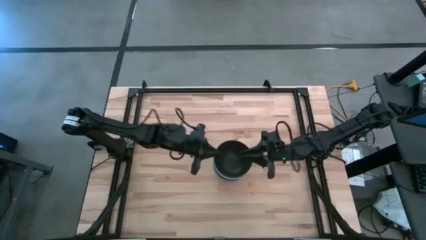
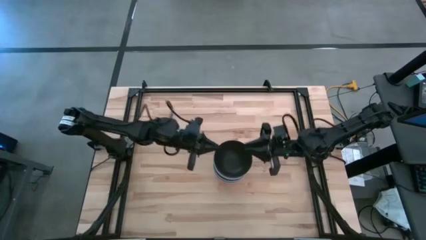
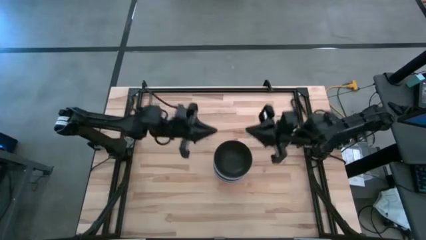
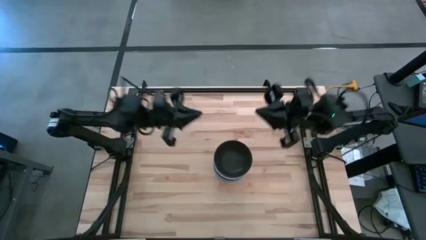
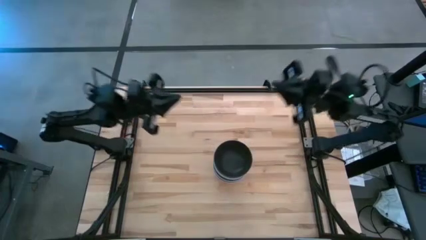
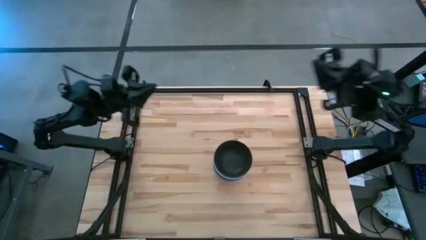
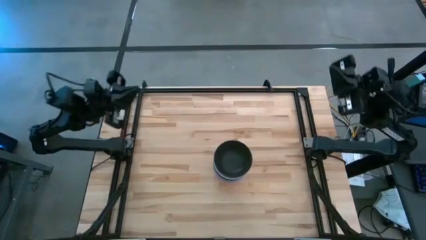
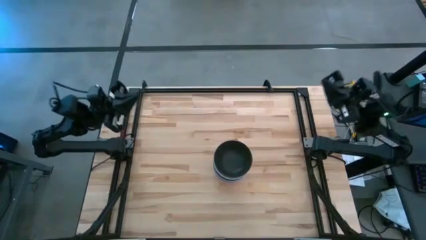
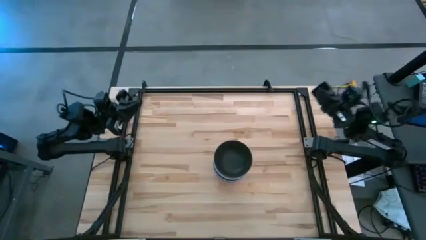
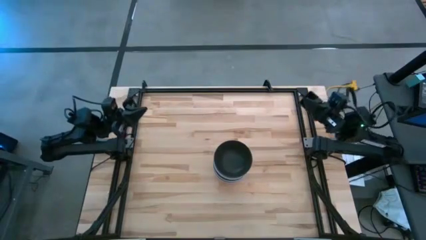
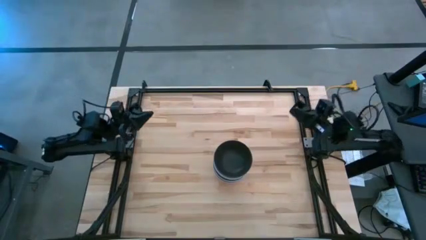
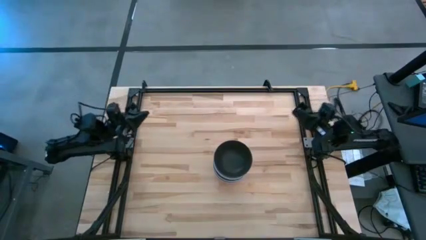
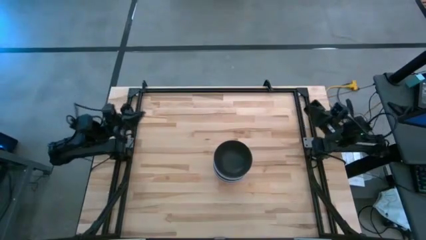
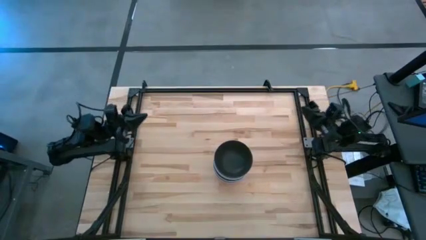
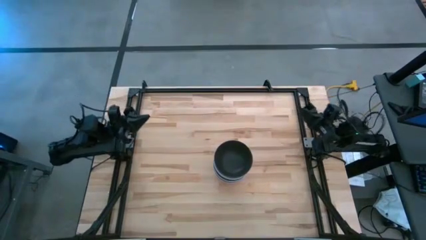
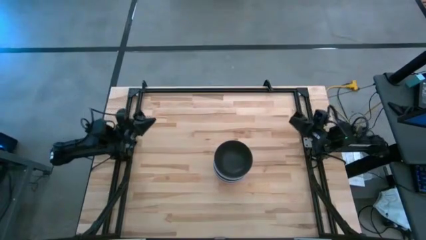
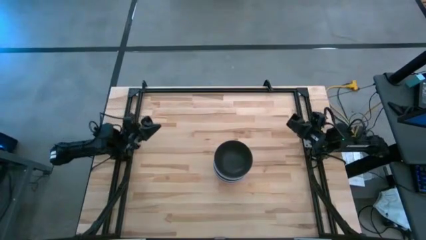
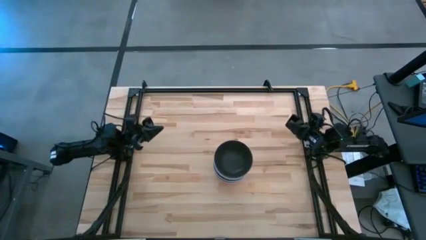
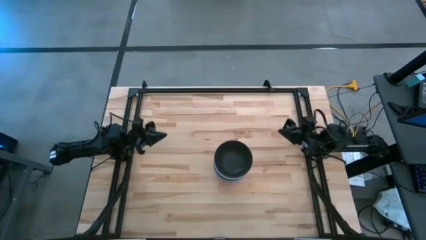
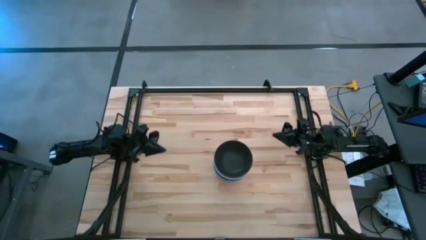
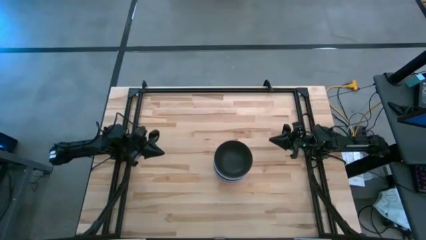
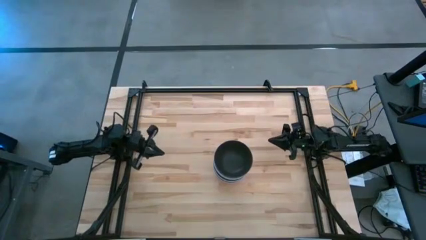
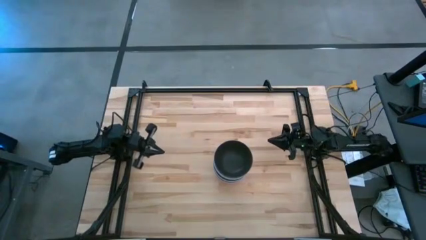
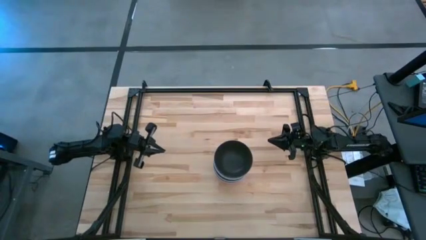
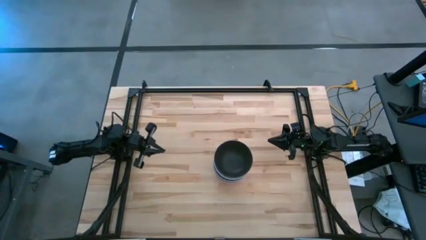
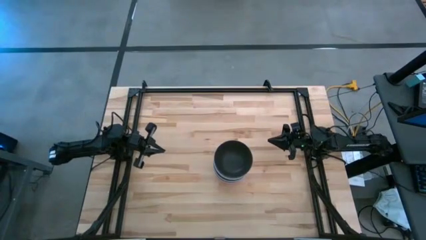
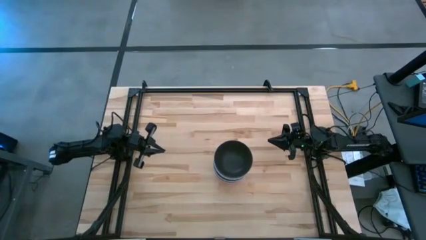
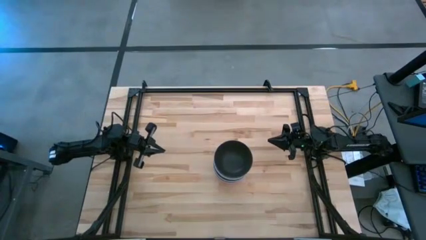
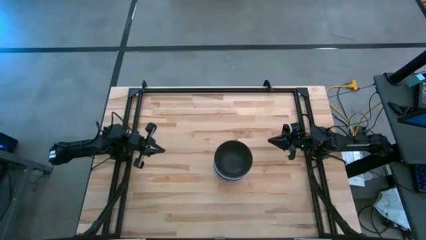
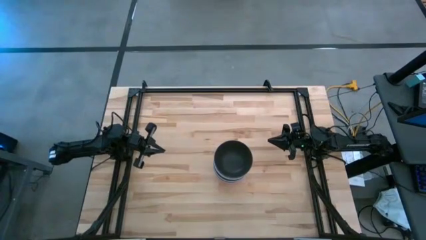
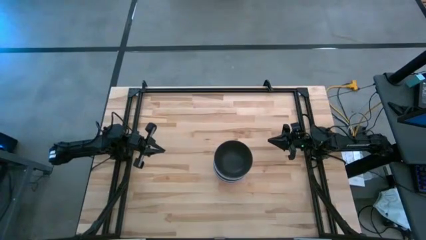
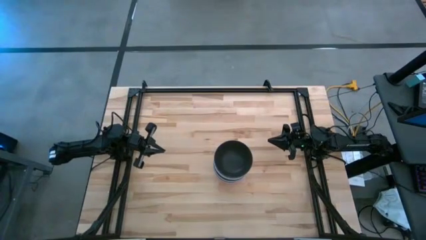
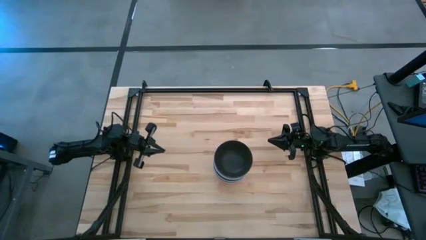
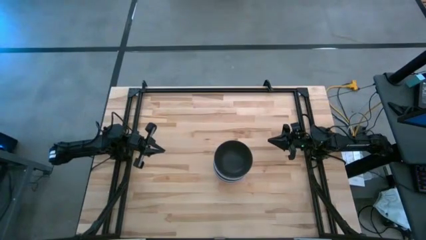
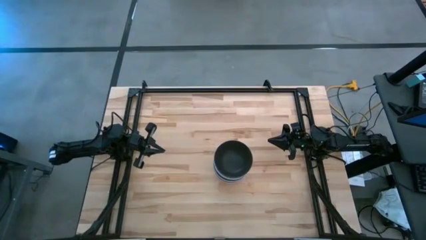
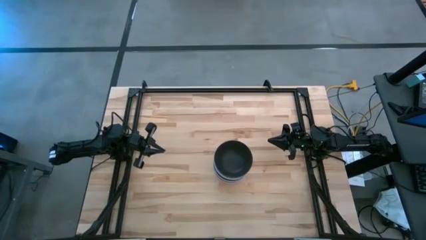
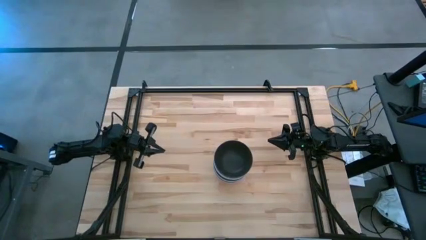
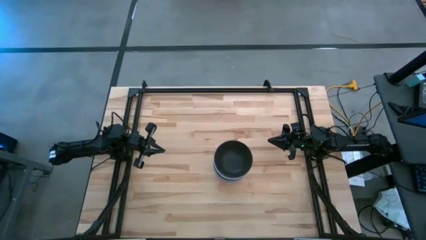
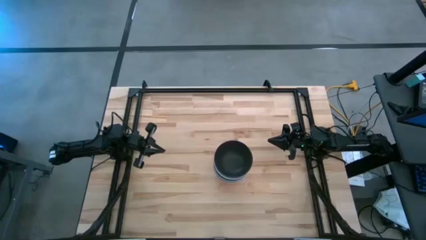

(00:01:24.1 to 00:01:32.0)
Task: Nest bowls inside each other
Return to Home Position

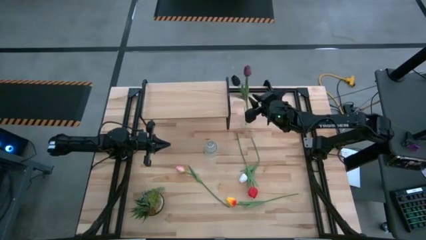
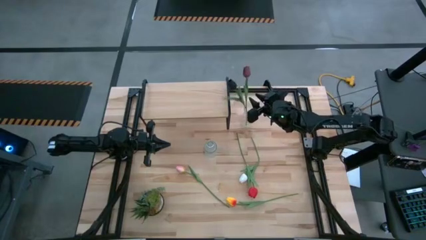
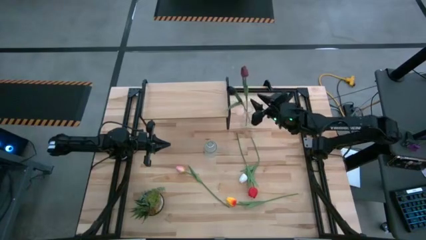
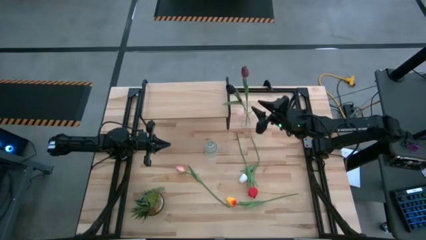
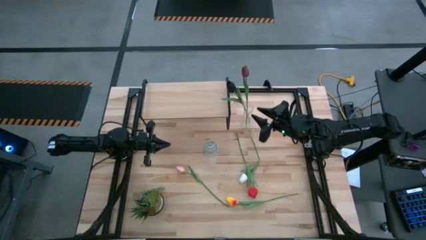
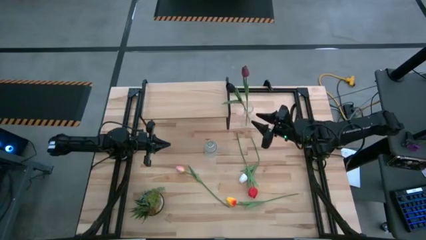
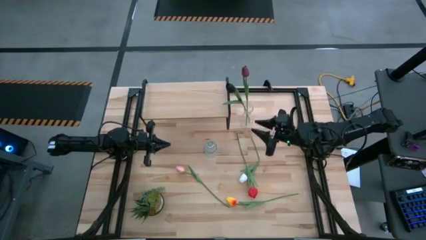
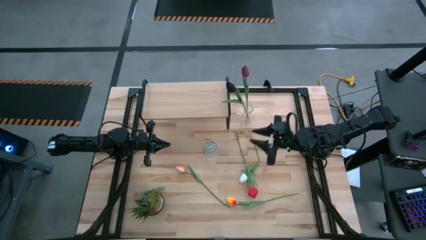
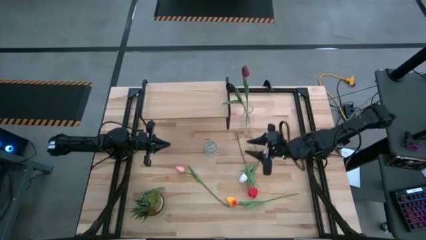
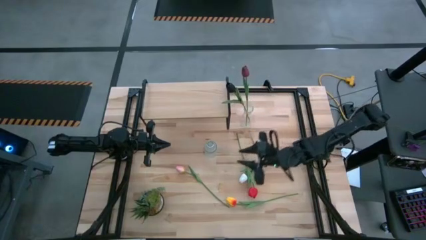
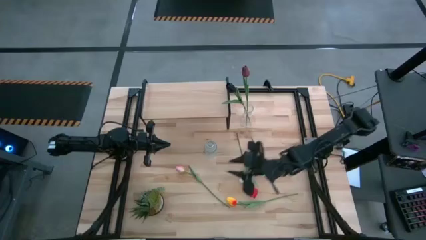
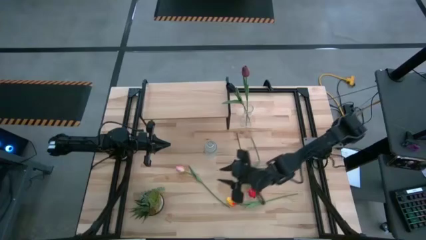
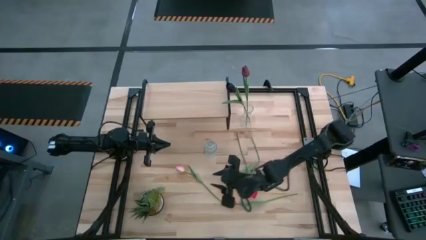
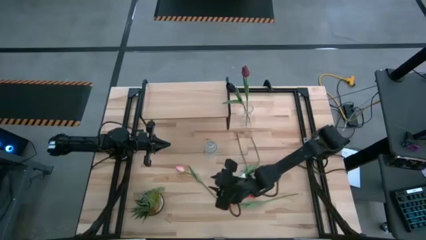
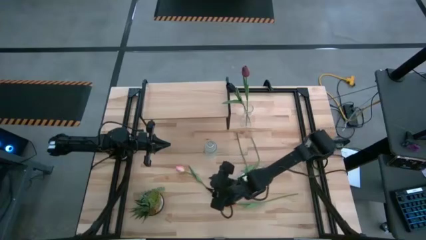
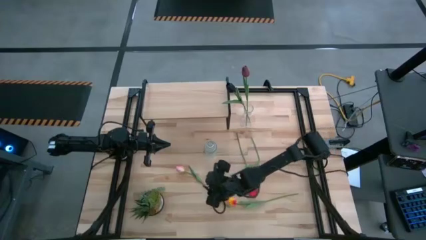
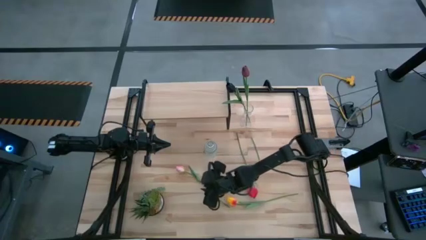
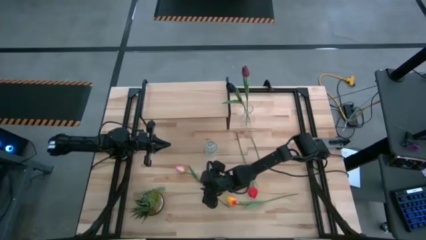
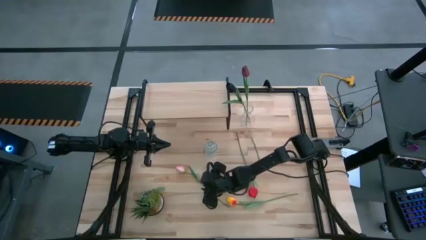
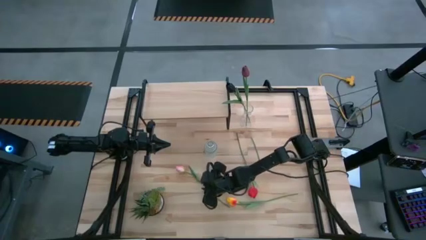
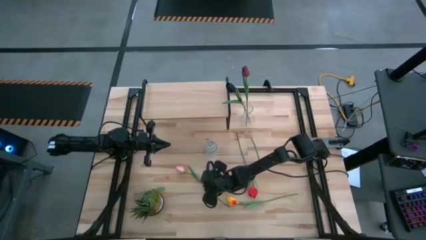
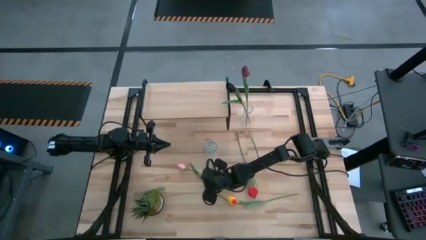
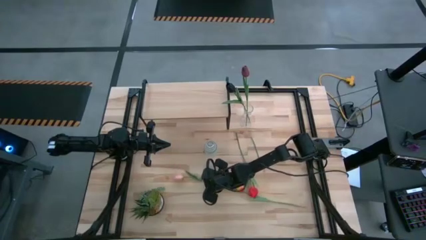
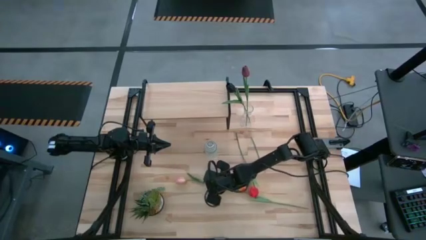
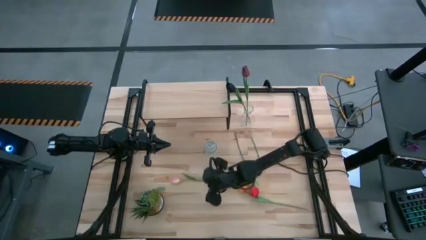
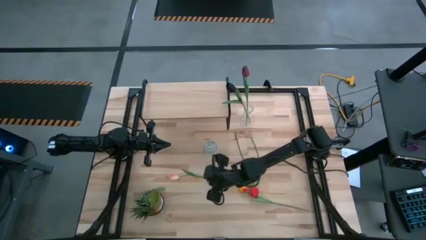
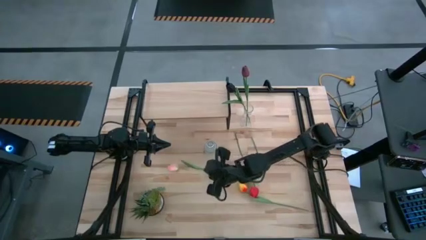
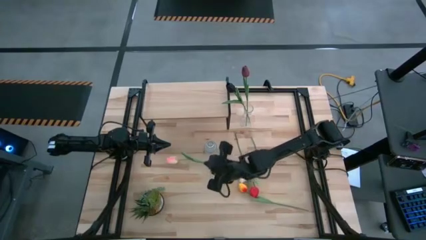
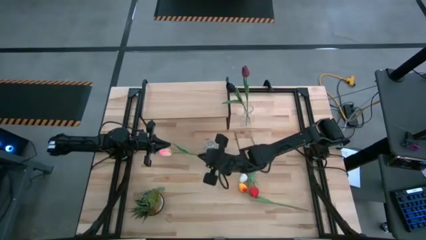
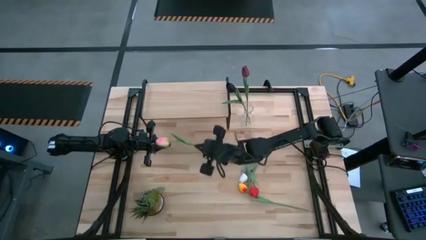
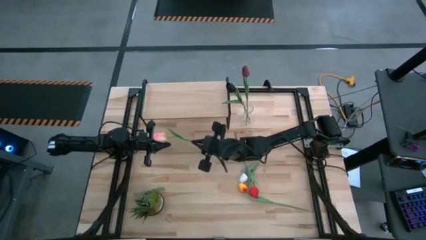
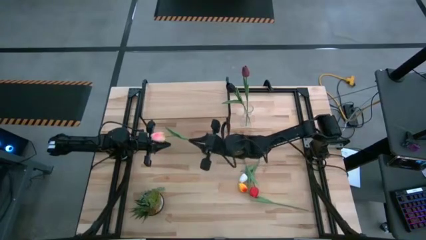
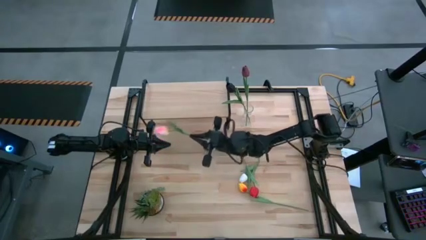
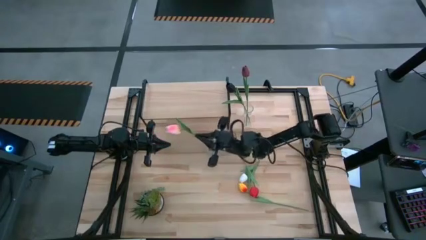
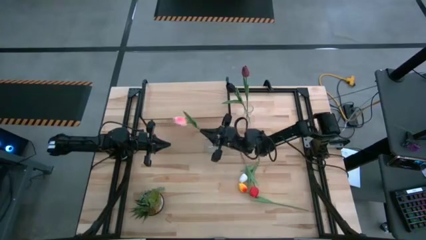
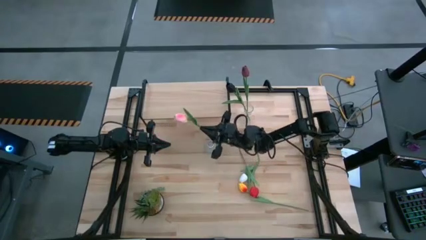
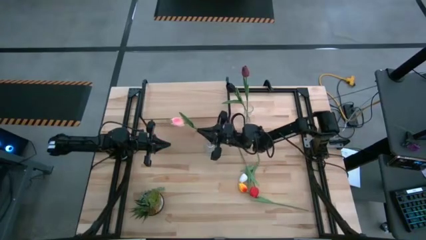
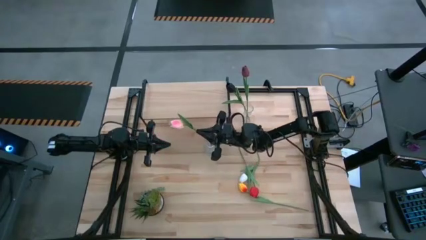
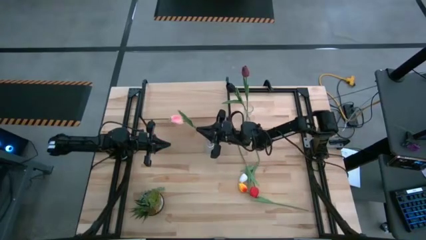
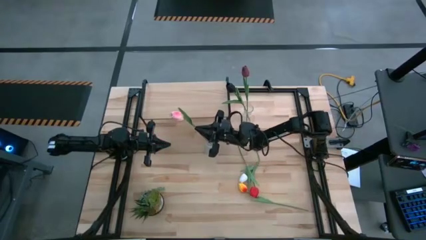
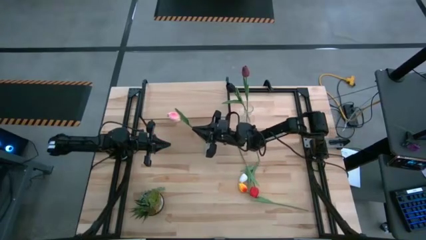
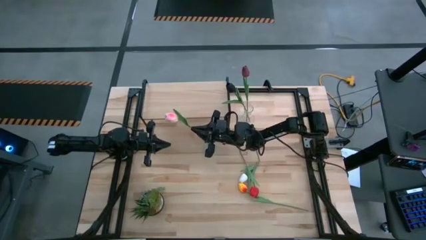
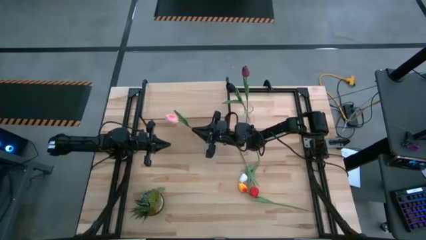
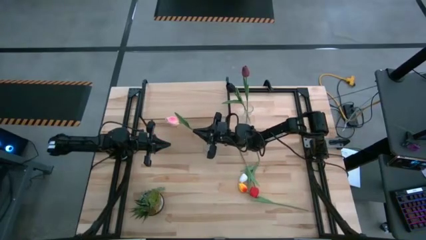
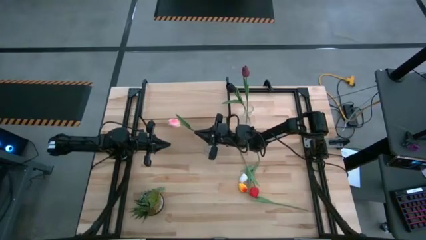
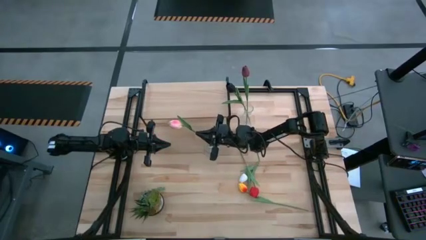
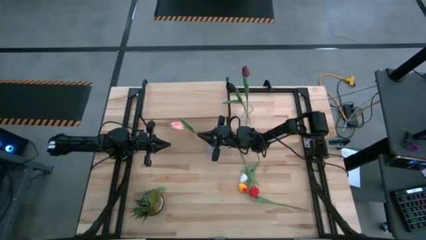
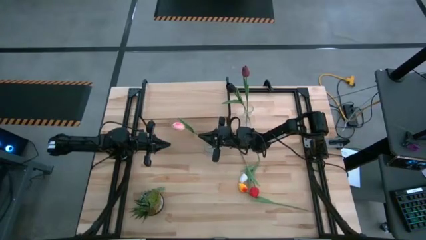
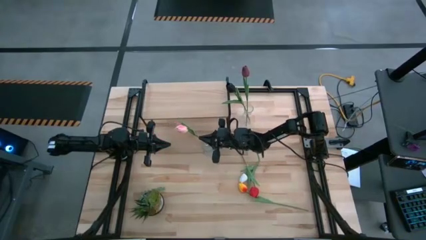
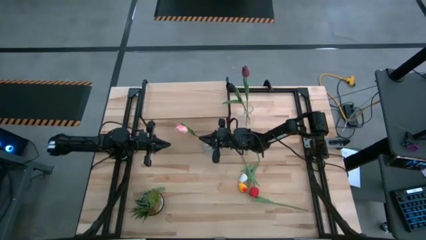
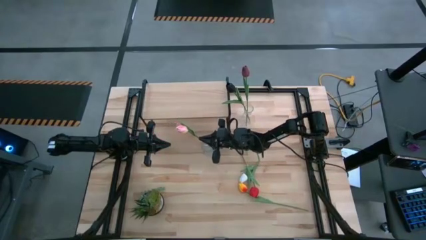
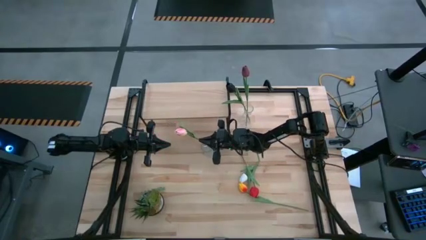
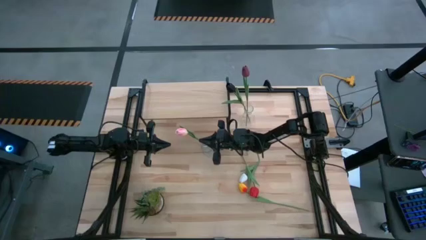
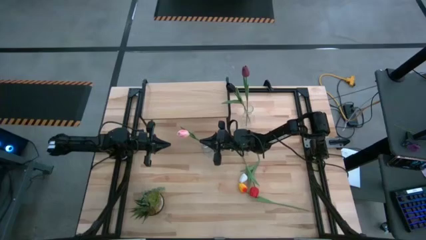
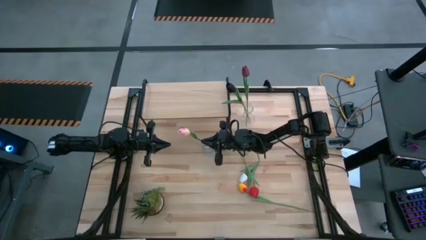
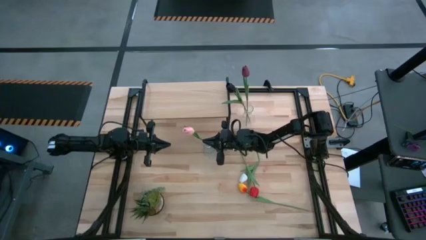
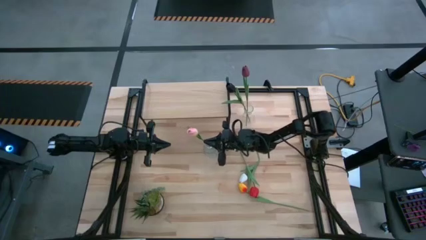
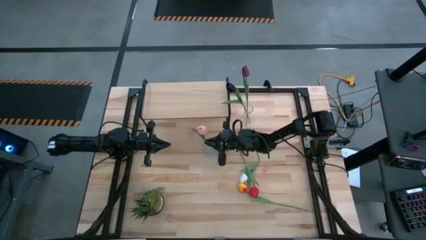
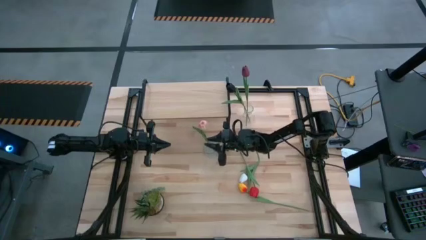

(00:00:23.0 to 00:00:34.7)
Task: Pick and place flowers into a vace then onto a shelf
Put the pink tulip into the bottom transparent vase
